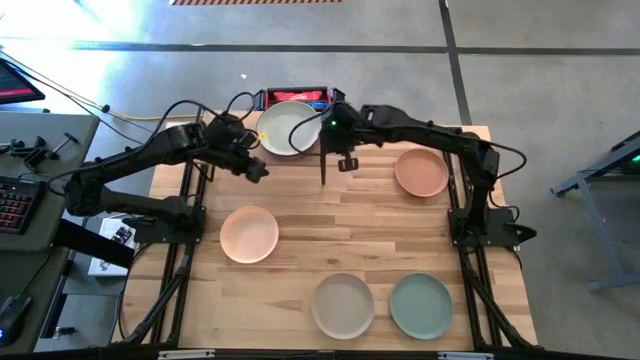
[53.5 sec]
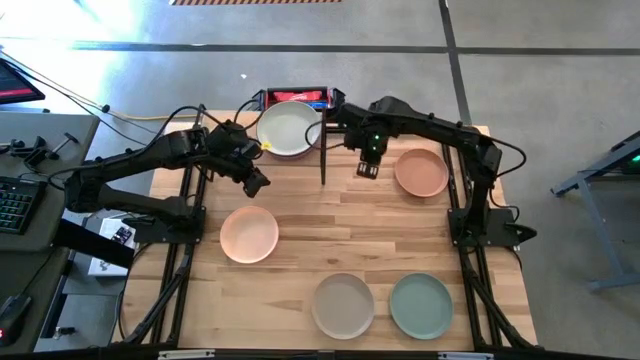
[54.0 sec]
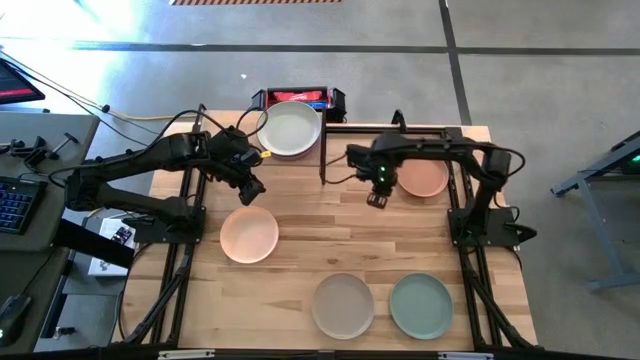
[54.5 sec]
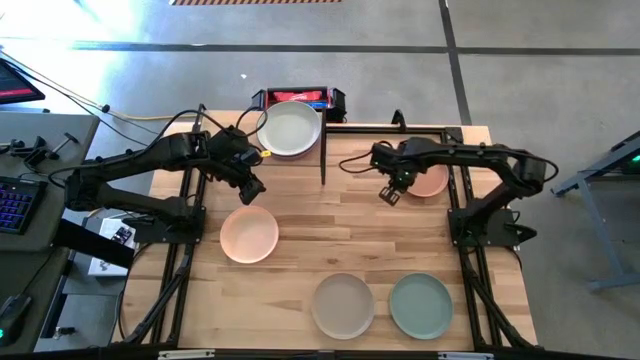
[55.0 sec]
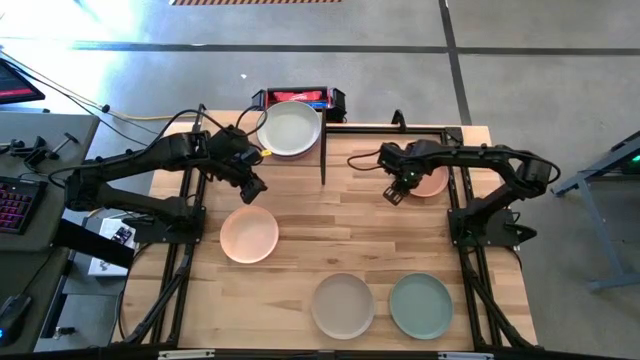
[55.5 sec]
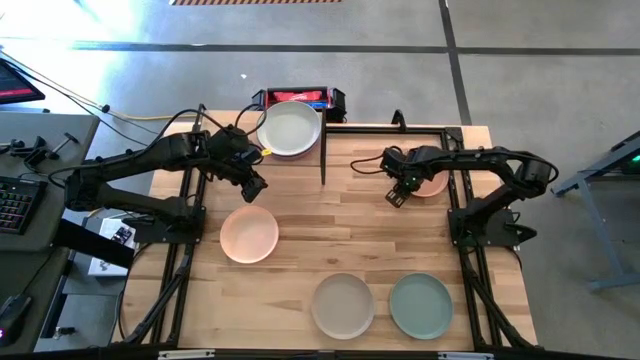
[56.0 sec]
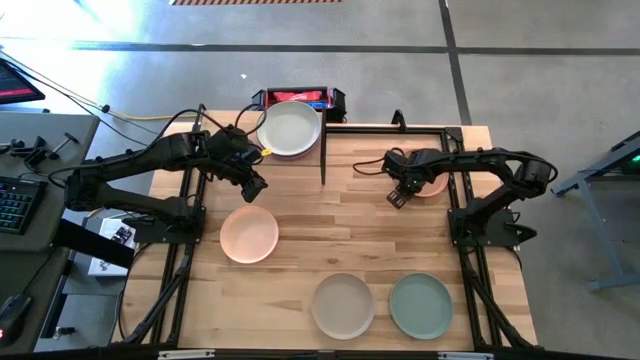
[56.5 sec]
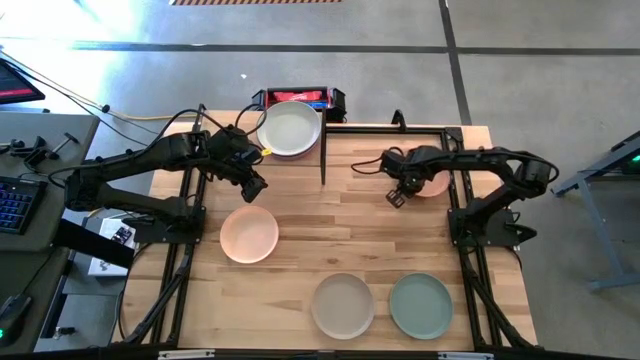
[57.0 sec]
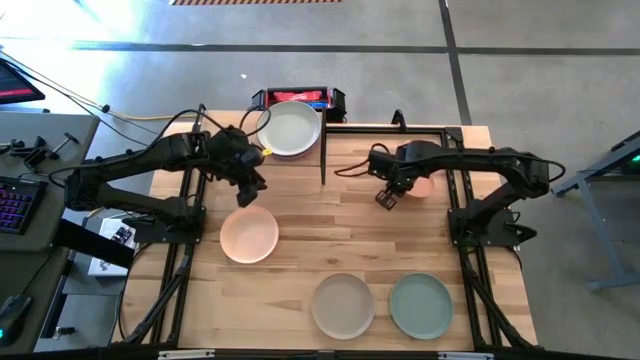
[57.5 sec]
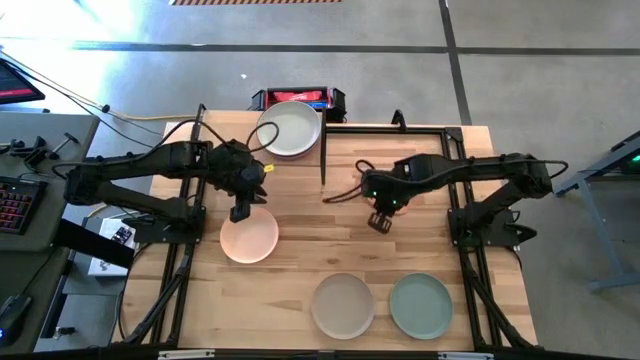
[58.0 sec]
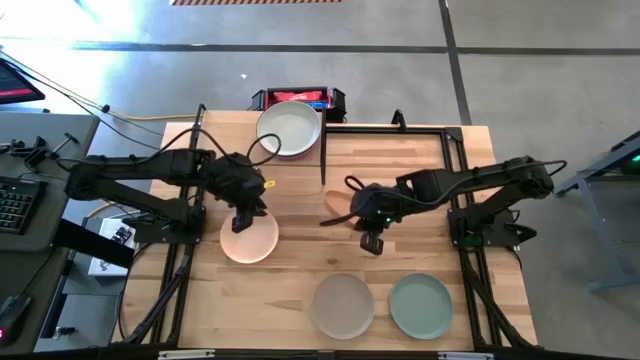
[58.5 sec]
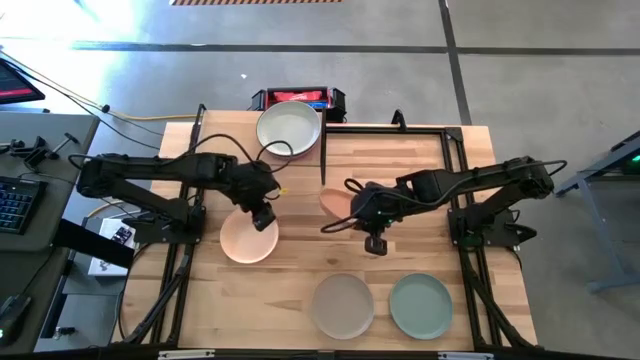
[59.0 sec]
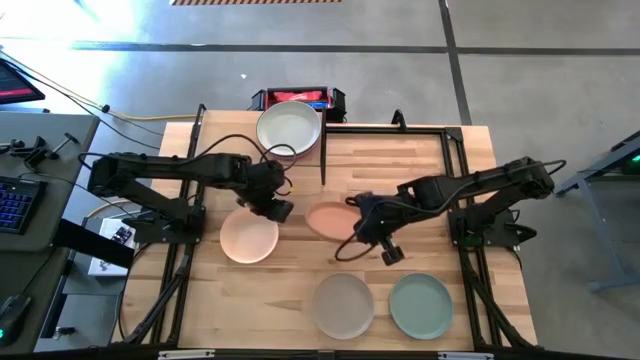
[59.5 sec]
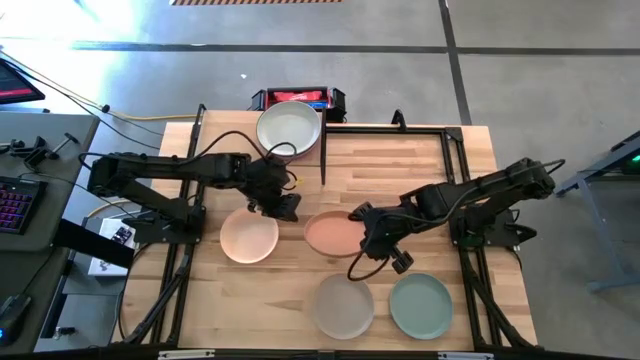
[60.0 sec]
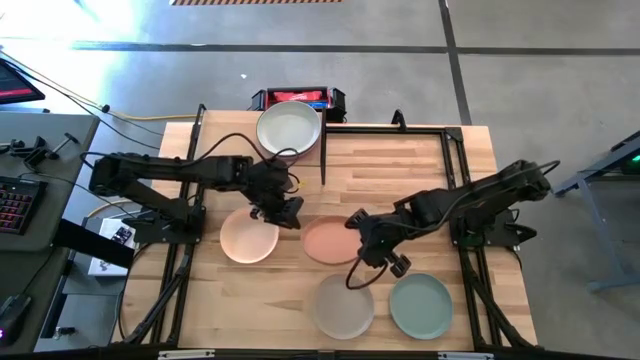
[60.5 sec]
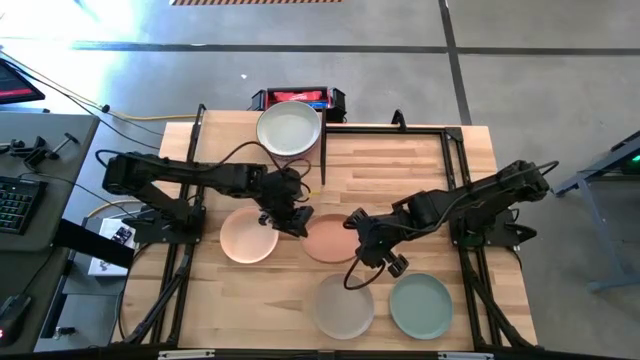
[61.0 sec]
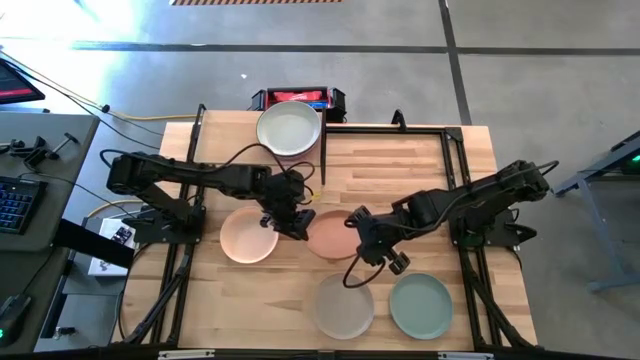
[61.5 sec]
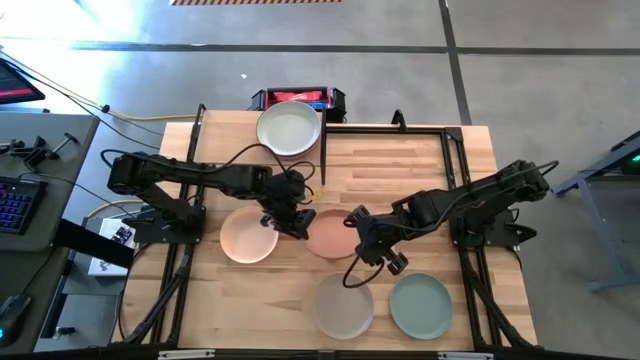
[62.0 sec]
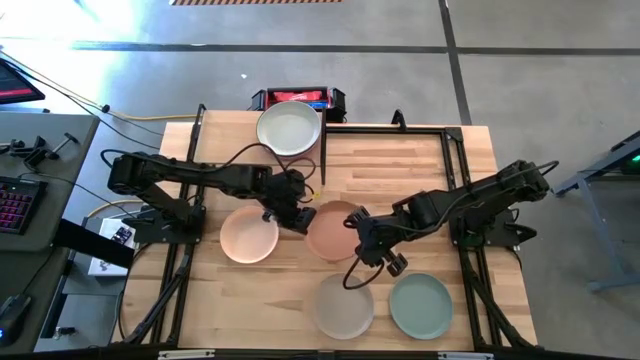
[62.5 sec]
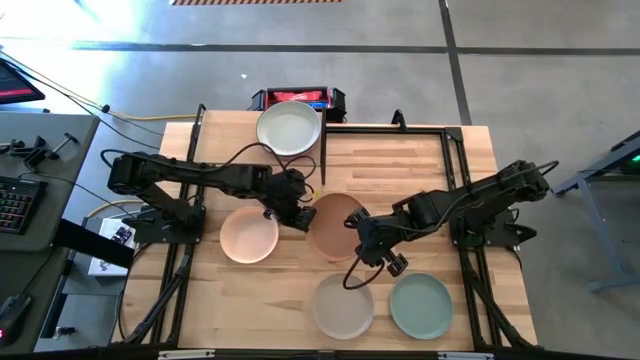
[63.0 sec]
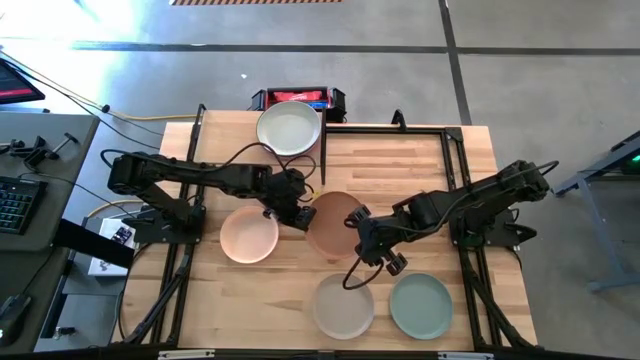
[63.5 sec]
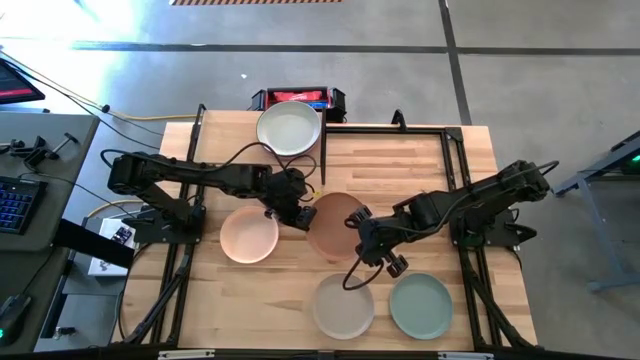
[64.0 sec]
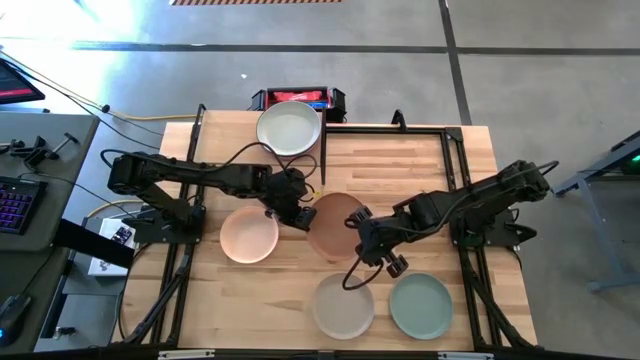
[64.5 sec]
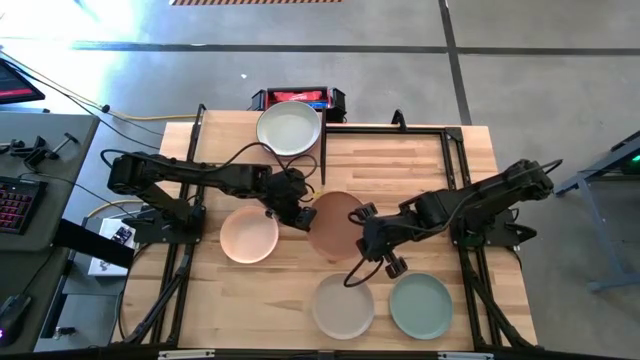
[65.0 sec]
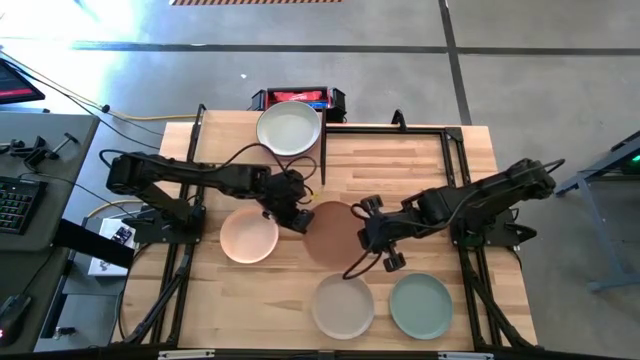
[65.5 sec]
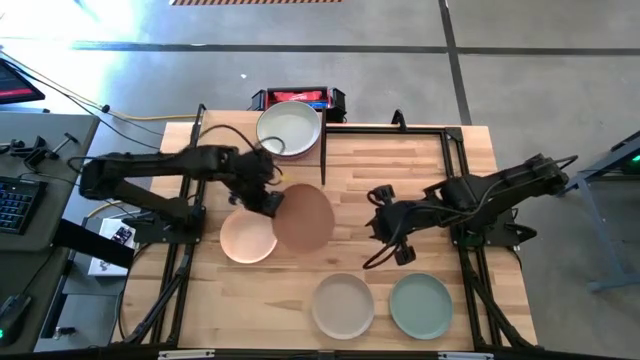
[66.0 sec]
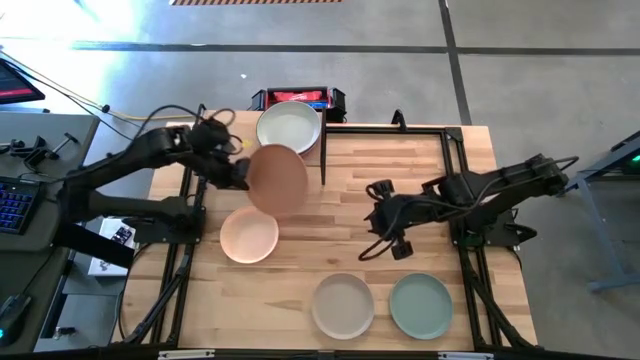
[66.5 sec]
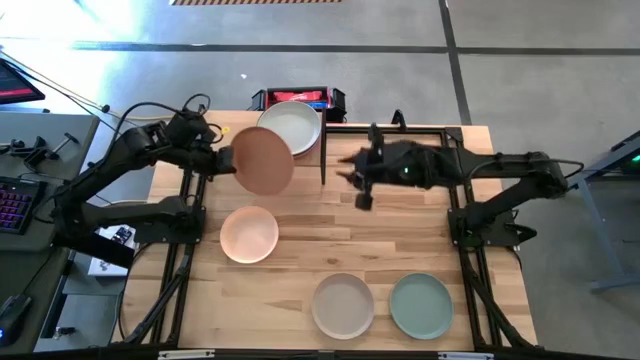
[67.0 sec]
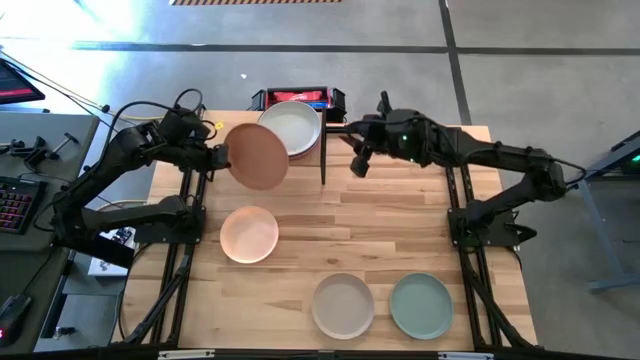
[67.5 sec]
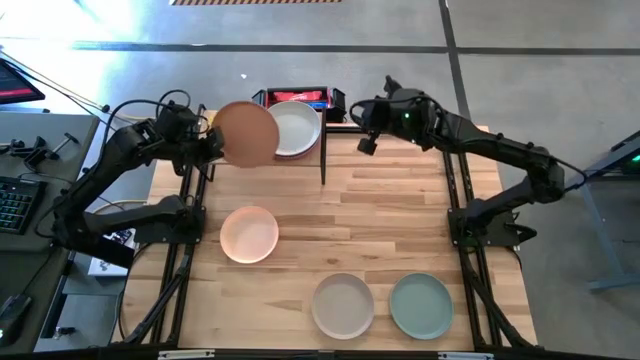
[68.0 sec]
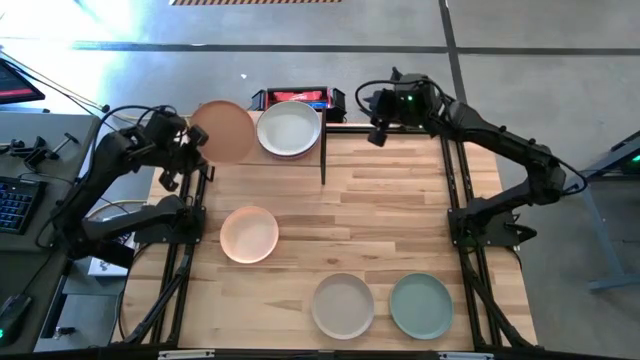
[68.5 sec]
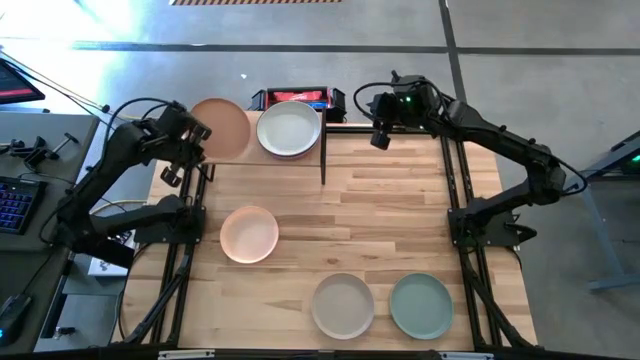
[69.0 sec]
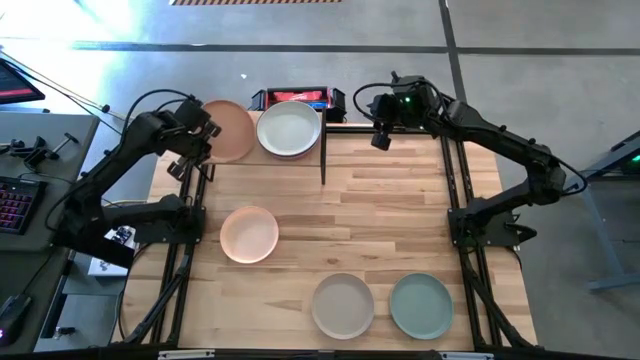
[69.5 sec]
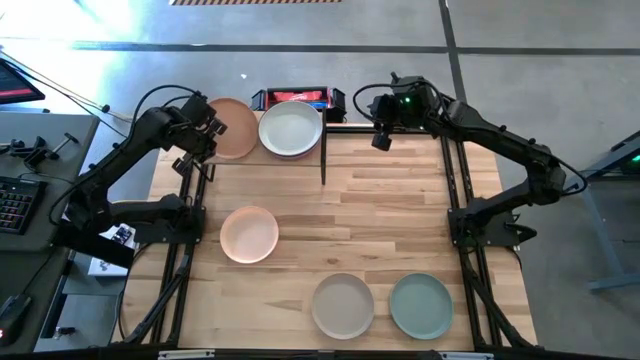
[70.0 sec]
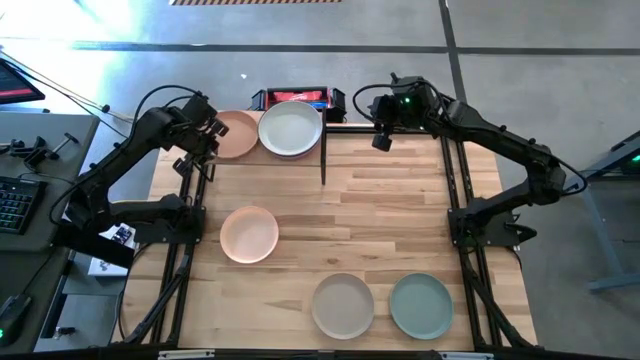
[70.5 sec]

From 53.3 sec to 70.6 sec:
Task: Place and stack plates onto a shelf
Put the orange plate on the shelf

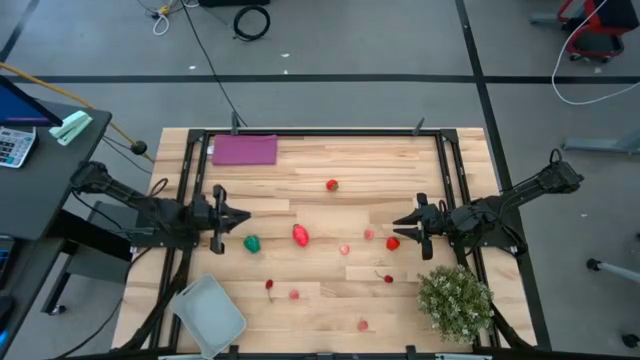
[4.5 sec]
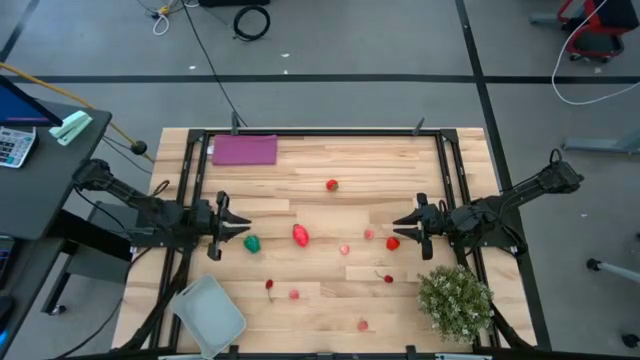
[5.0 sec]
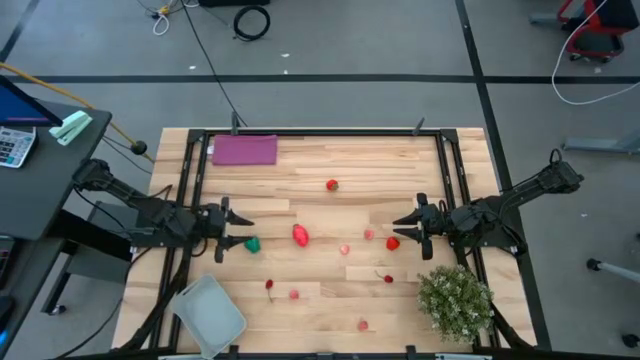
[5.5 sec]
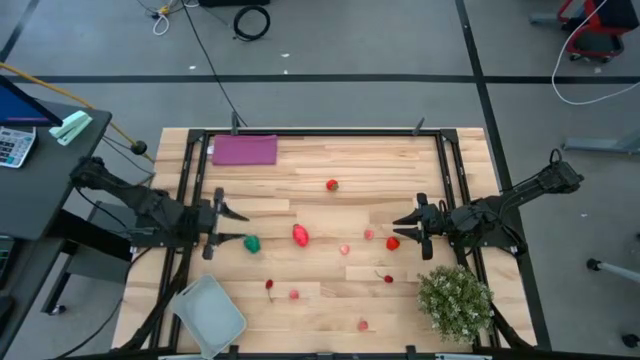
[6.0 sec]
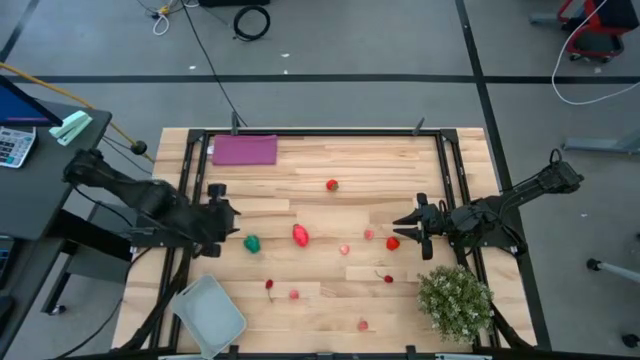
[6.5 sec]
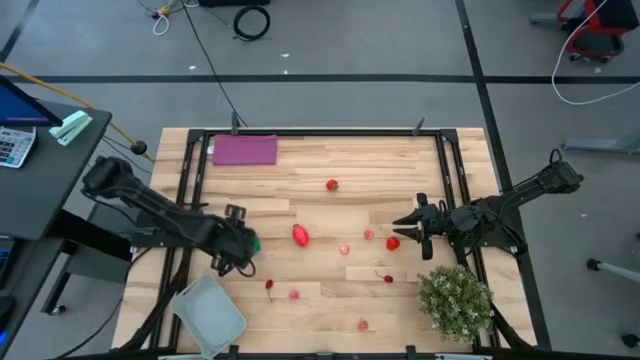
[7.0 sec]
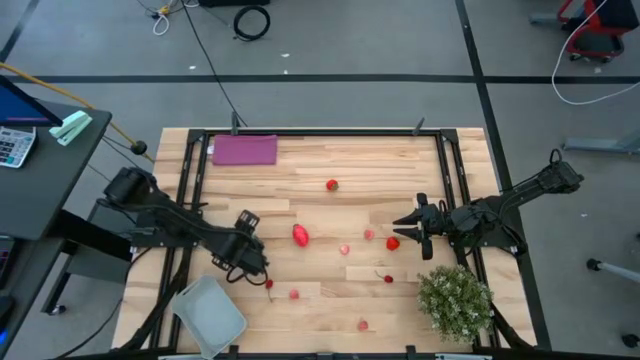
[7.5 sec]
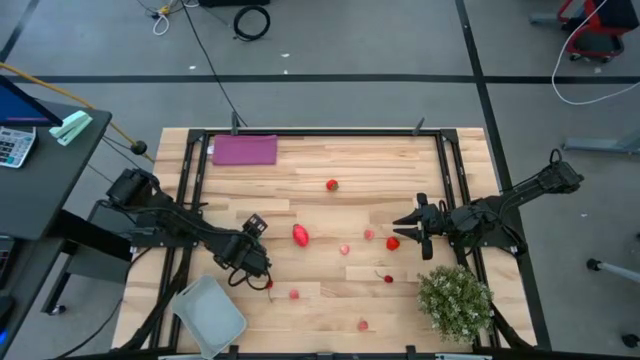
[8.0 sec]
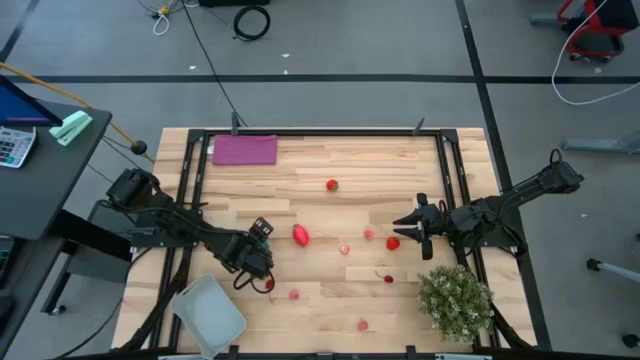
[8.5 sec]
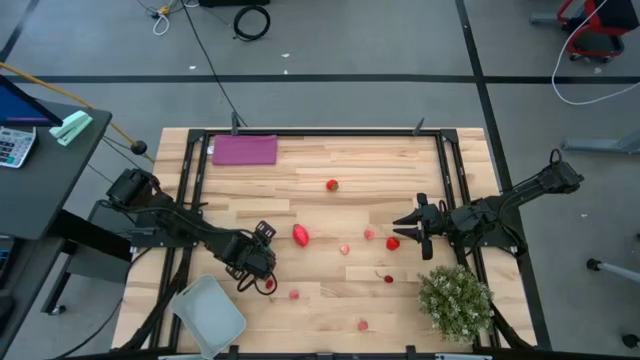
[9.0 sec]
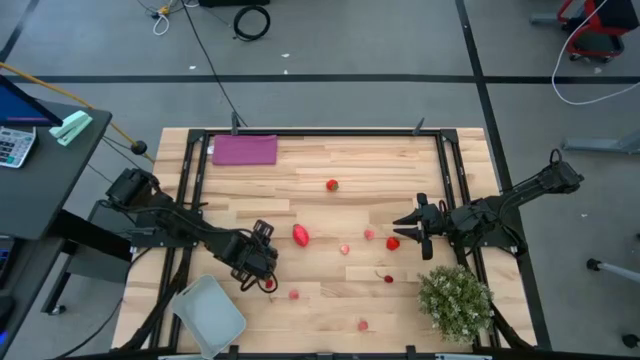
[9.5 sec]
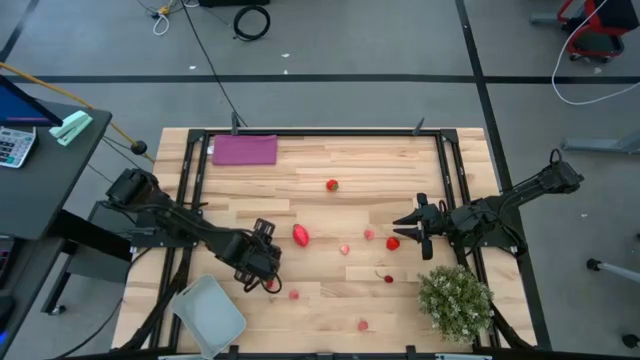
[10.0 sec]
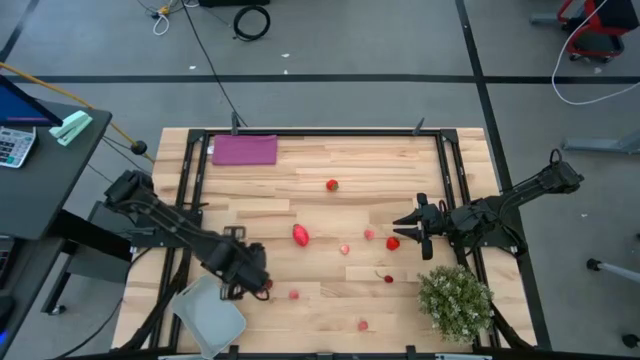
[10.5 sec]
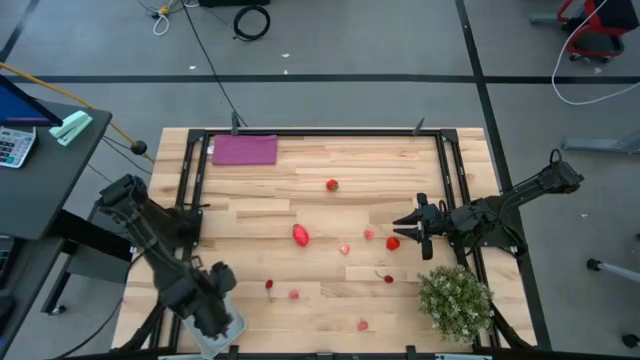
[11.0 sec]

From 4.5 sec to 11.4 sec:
Task: Pick and placing Produce into tupperware
Put the green bell pepper into the gray container
